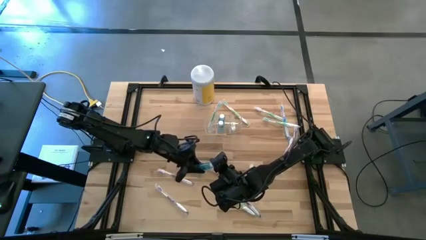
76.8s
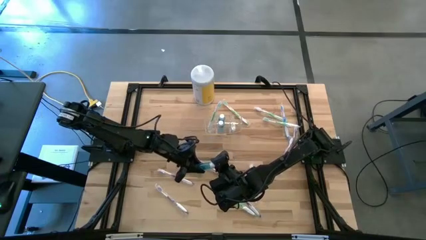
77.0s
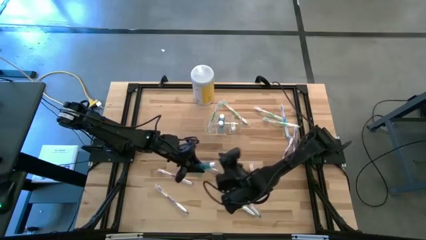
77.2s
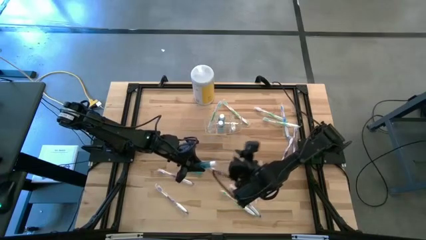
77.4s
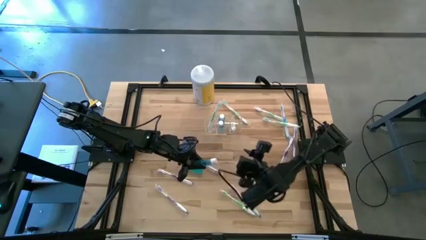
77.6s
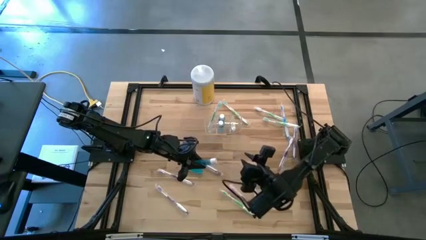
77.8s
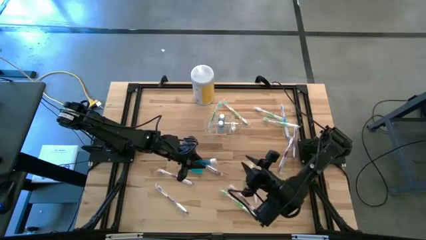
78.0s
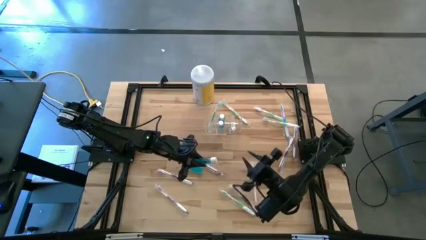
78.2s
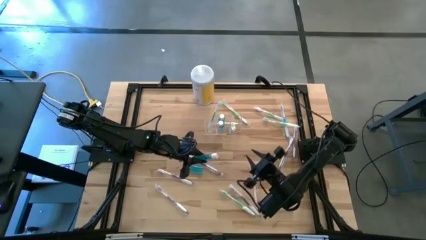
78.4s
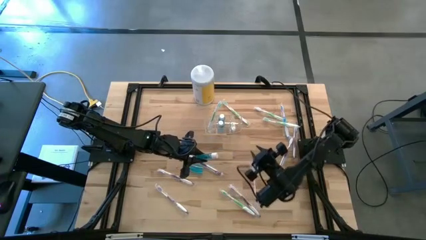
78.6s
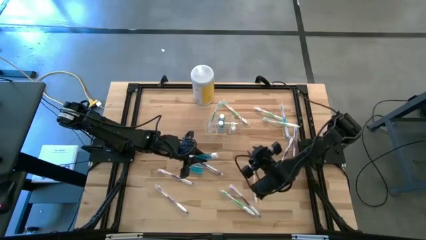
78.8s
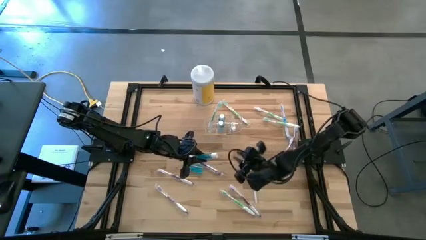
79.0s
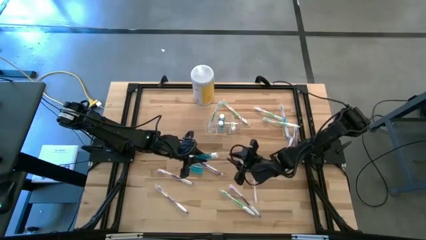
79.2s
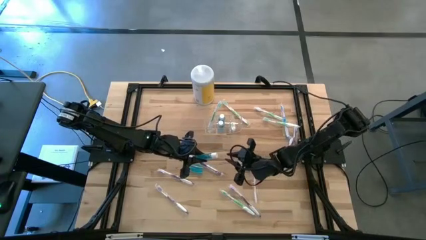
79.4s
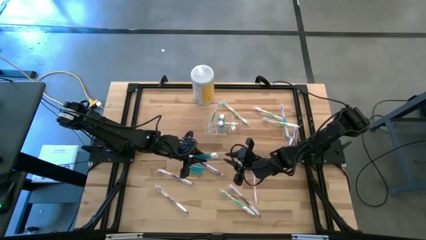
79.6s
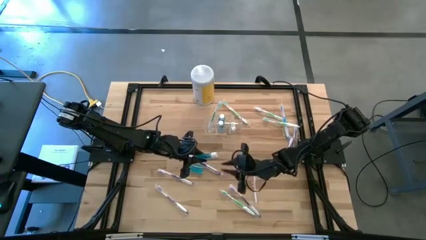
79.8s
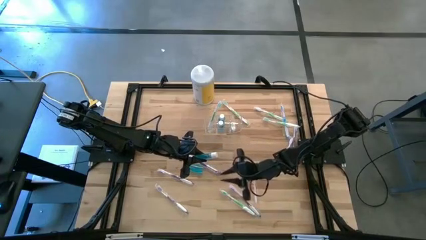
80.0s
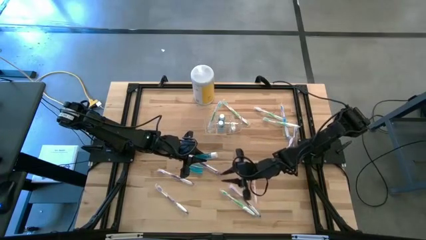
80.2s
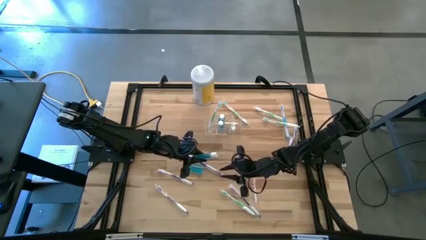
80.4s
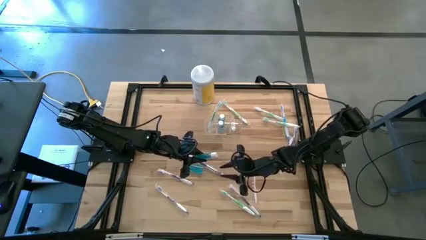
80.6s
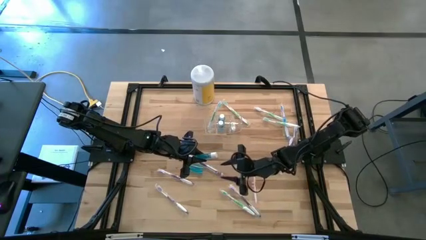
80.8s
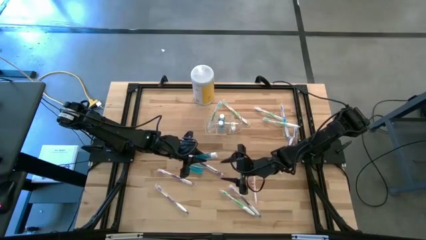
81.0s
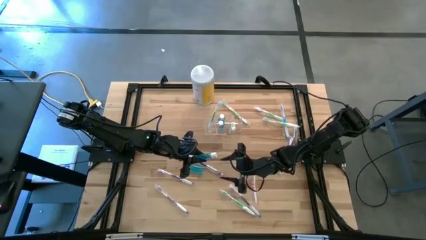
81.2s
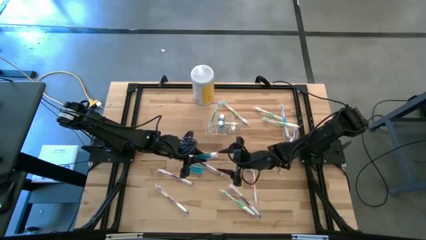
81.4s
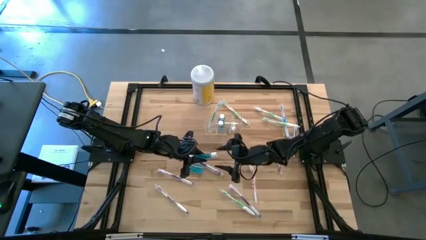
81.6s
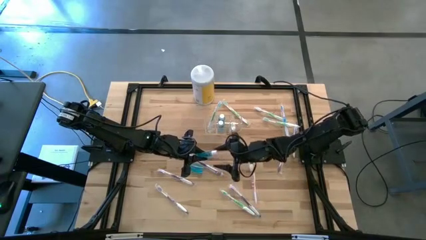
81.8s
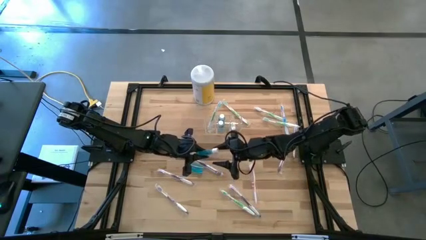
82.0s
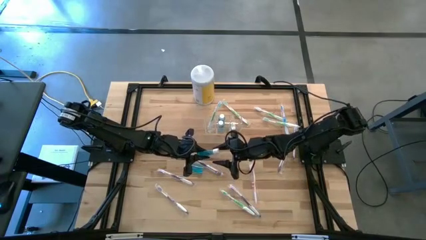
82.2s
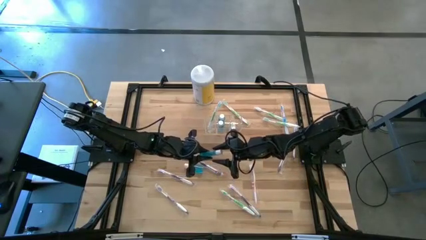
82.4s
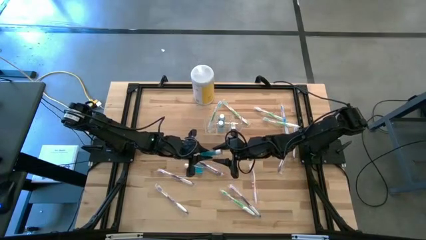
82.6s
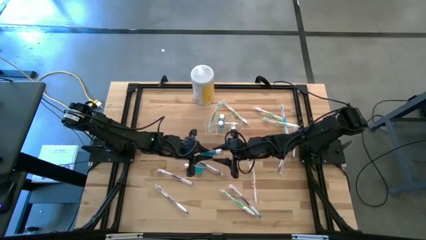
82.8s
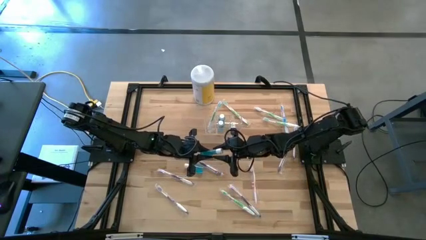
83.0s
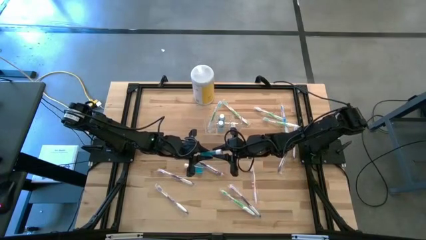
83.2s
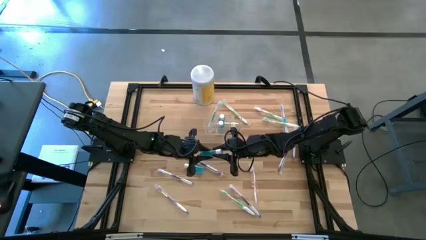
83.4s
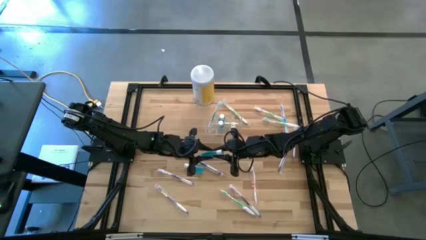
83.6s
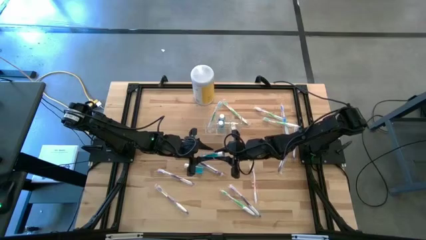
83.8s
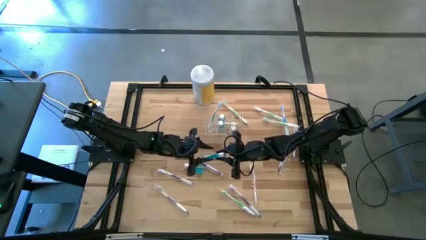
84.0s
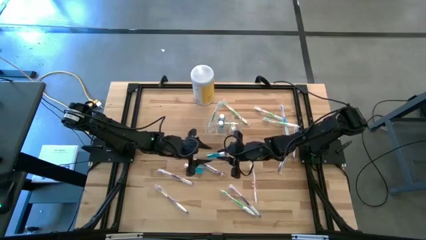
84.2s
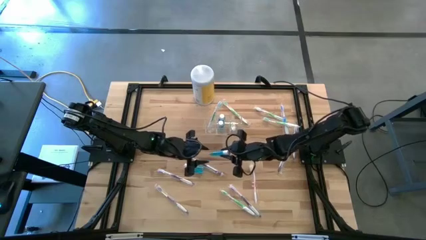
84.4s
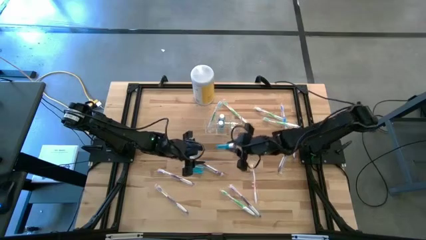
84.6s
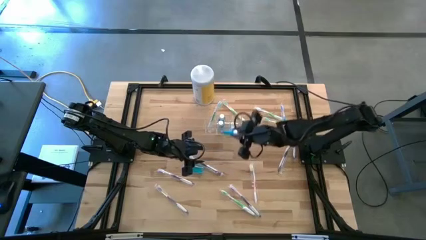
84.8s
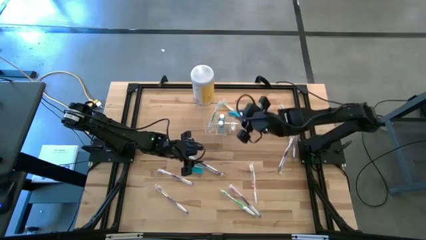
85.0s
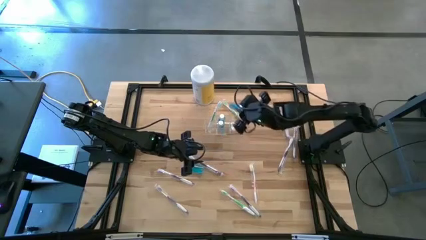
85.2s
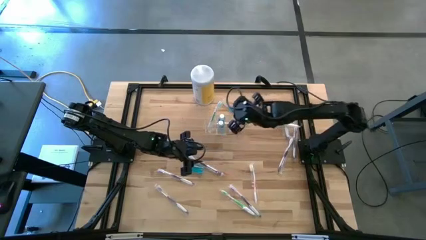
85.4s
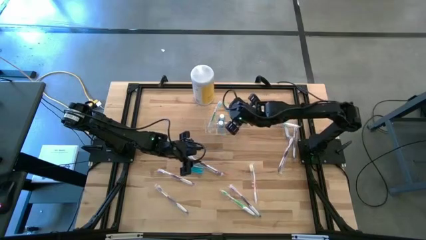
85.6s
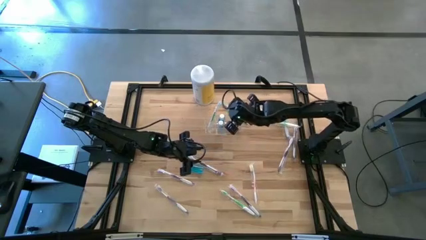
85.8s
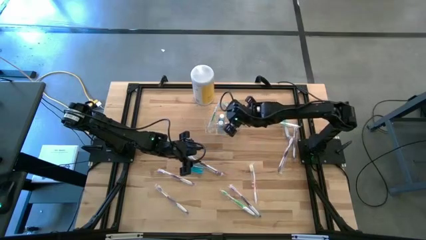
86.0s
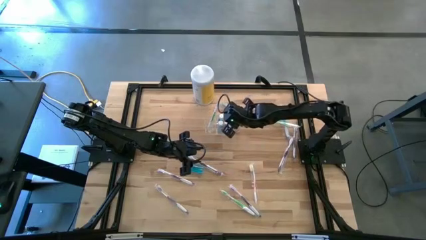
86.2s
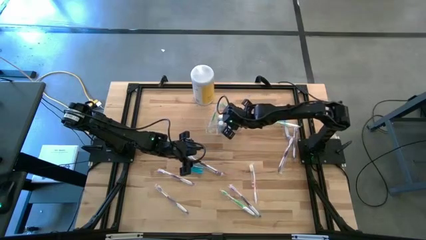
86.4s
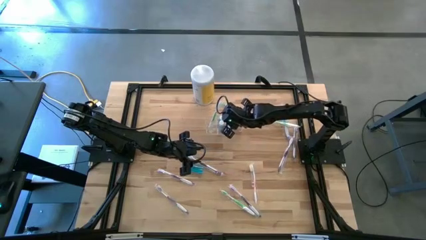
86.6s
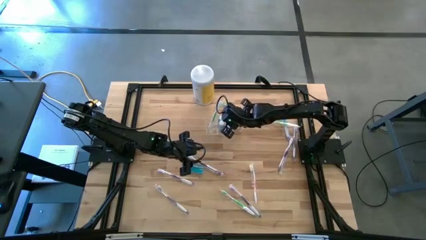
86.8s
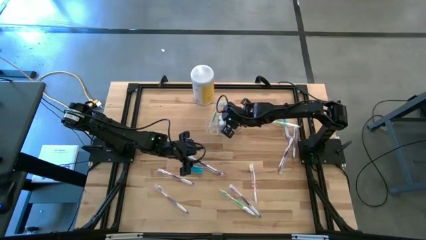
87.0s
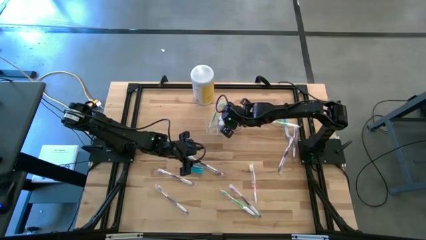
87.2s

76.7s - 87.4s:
Task: Pick & Place toothbrushing station
Put the top mouthwash into the transparent organizer

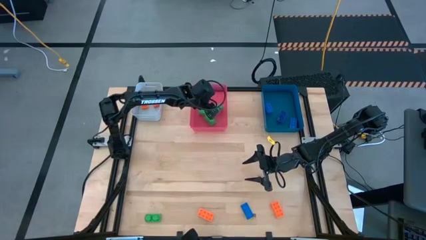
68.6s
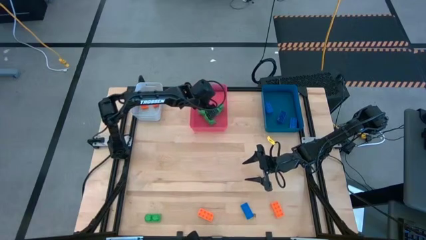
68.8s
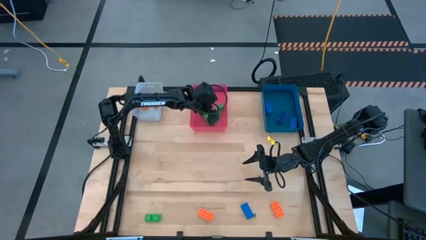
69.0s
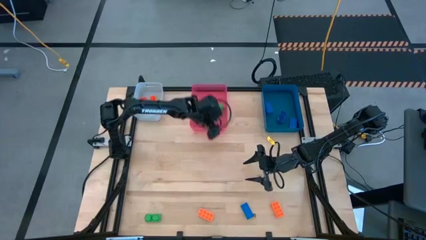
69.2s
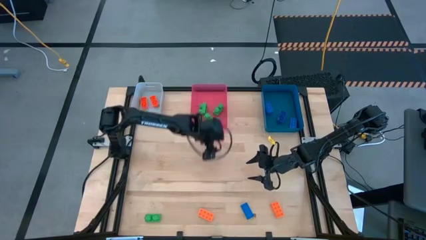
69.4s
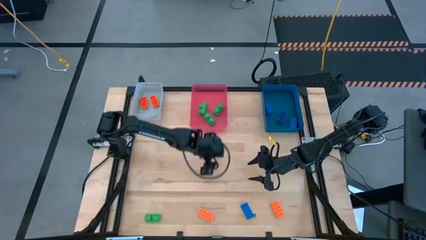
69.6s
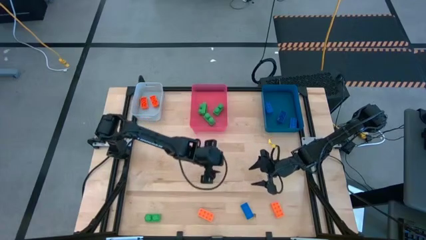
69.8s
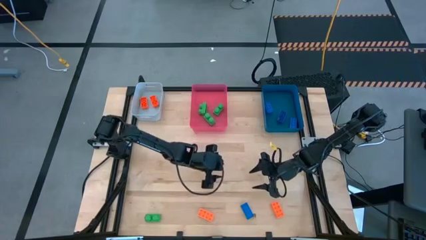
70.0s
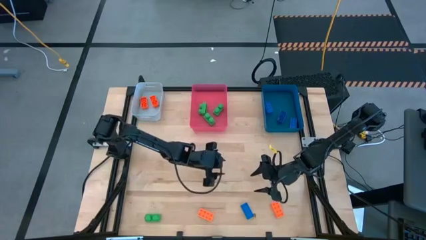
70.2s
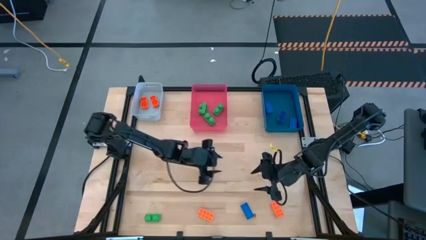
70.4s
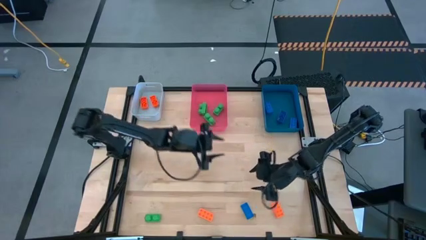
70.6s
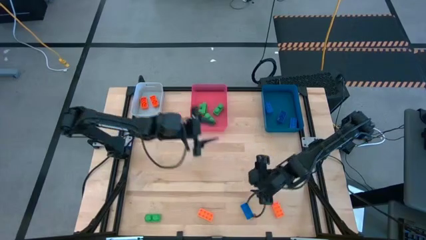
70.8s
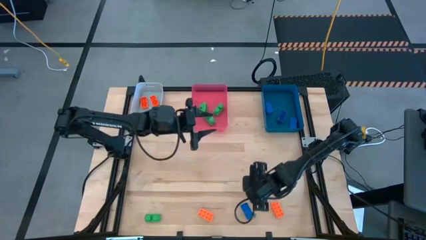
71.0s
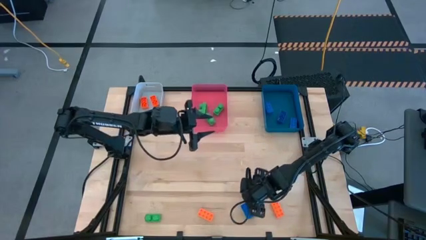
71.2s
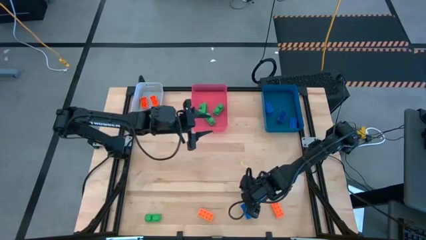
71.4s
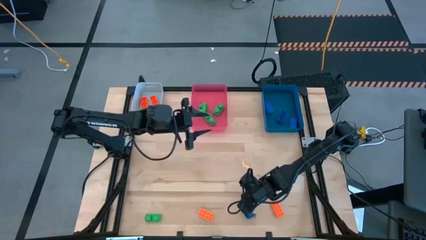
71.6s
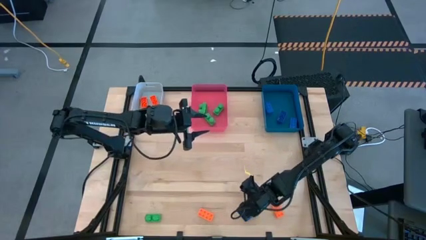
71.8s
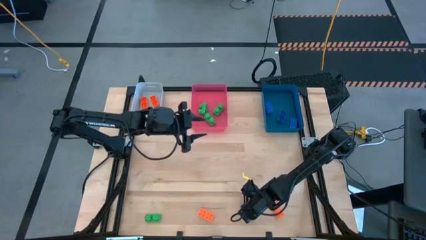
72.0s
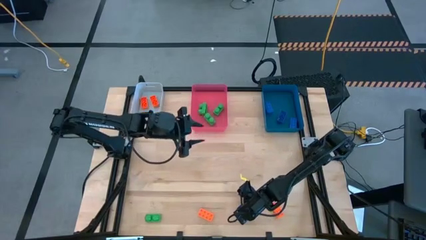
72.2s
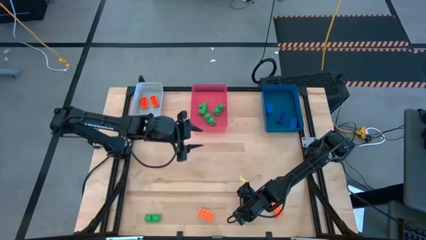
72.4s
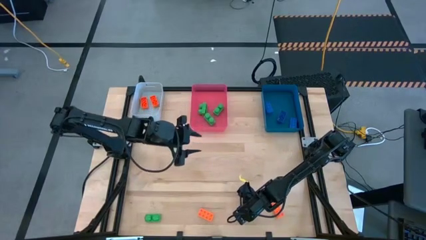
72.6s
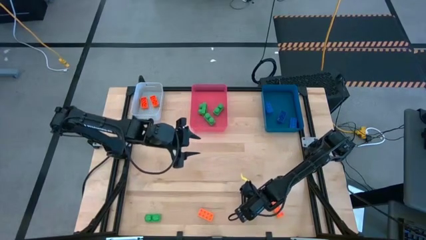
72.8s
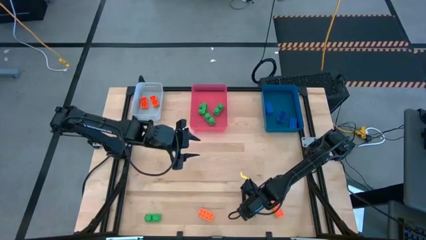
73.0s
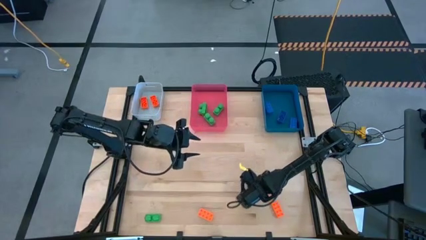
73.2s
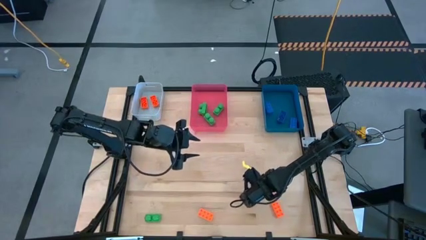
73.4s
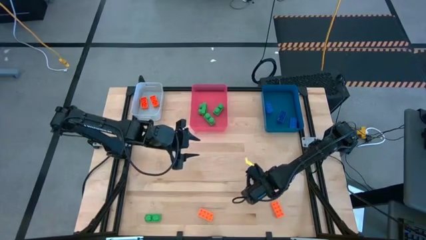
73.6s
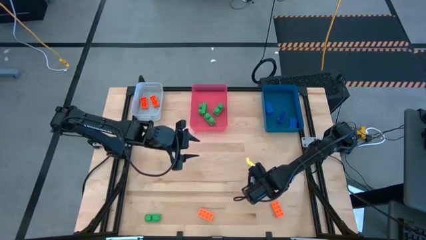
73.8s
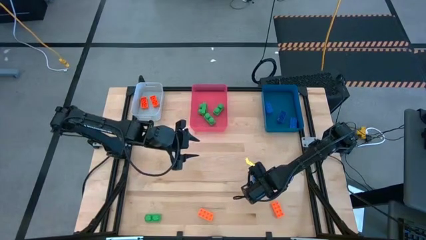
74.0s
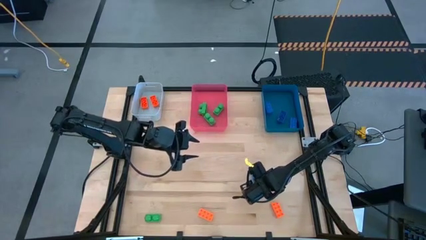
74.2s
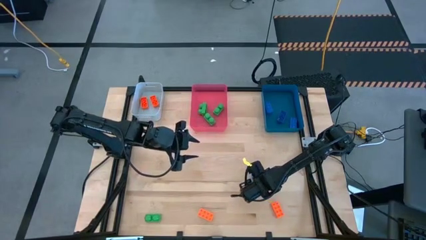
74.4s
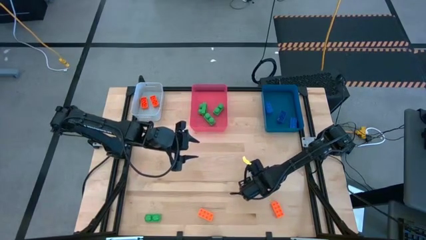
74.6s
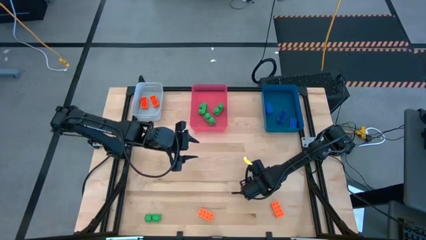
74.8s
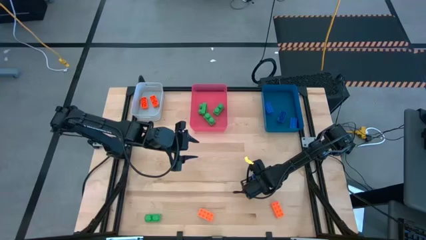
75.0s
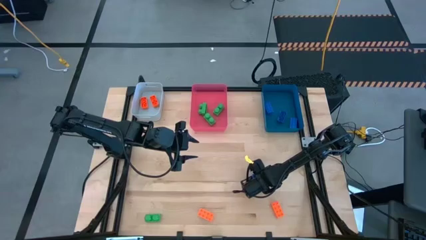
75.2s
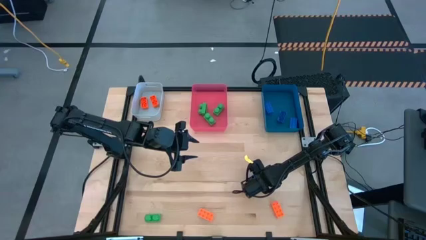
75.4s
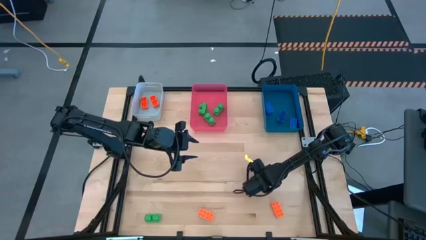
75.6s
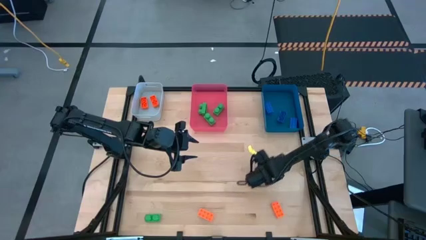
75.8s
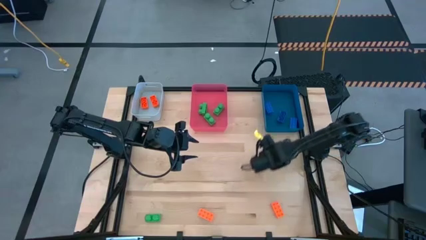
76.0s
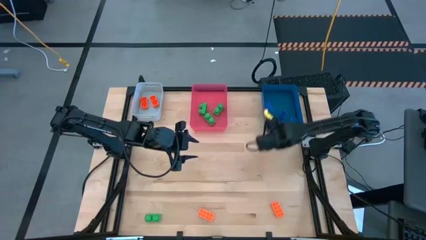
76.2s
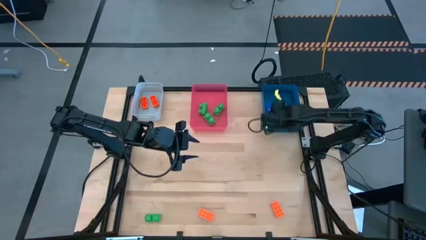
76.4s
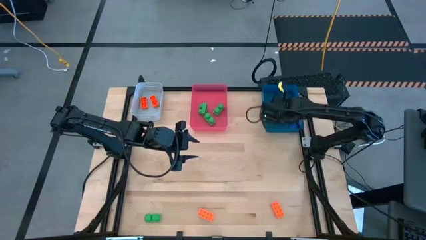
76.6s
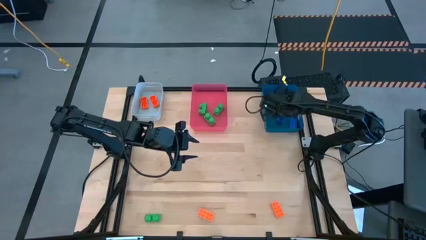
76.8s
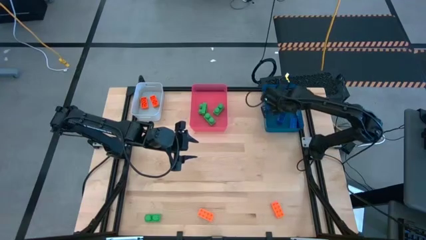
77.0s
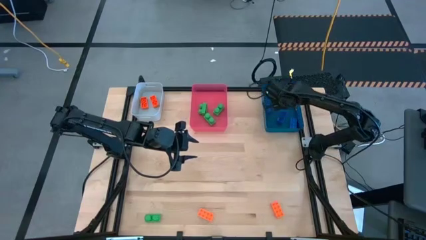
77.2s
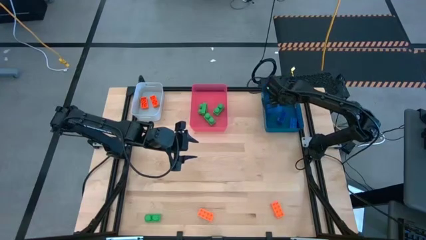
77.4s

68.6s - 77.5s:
Task: Sort & place blocks by color
Put the blue game piece into the blue bin
